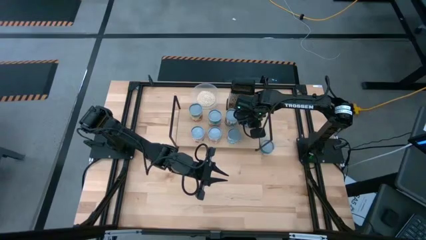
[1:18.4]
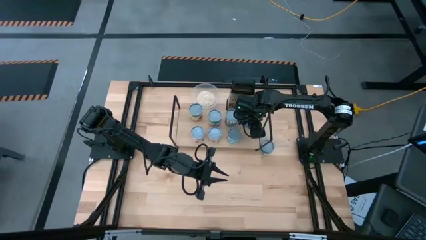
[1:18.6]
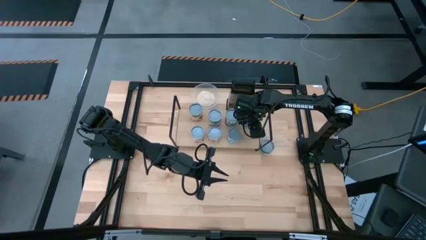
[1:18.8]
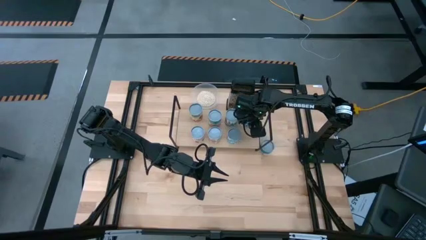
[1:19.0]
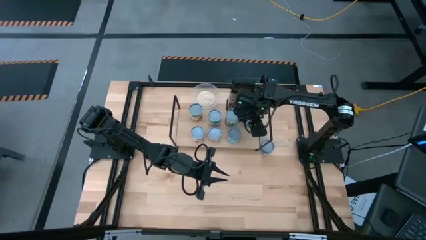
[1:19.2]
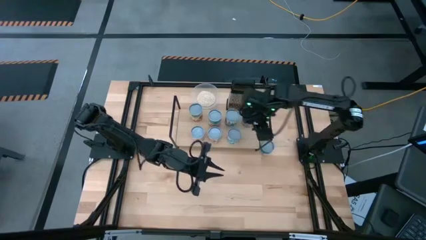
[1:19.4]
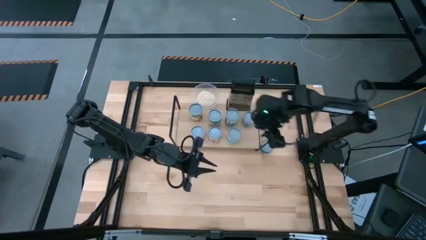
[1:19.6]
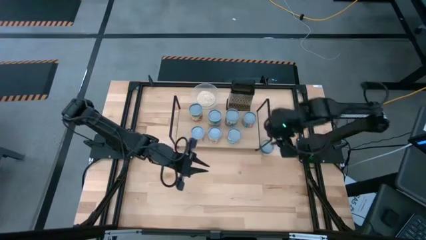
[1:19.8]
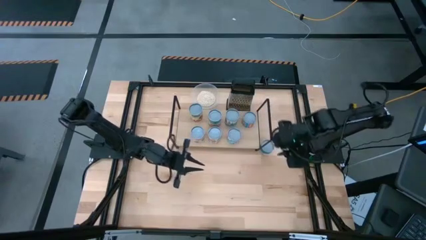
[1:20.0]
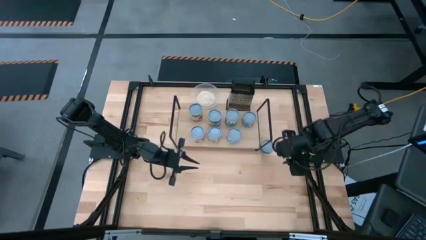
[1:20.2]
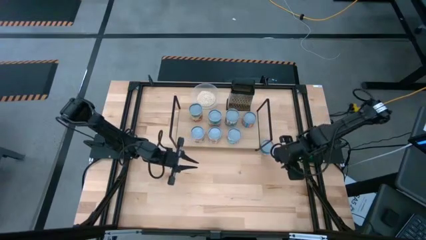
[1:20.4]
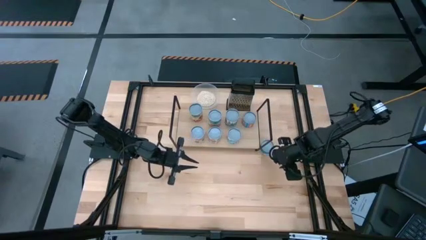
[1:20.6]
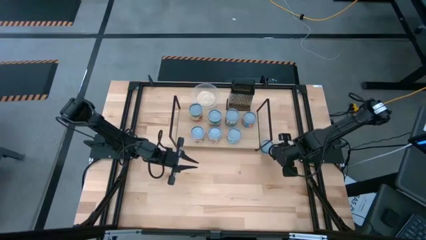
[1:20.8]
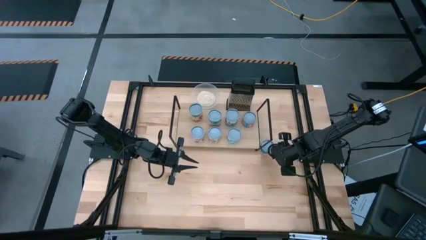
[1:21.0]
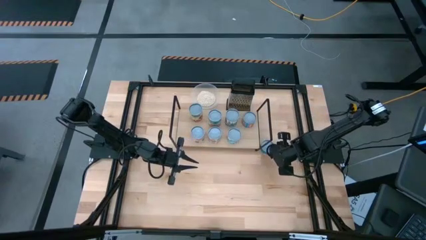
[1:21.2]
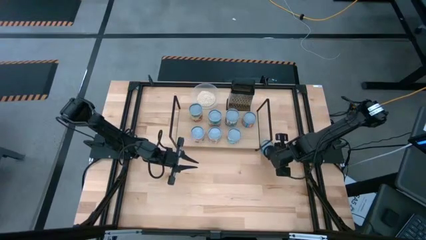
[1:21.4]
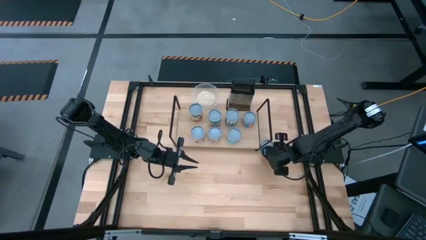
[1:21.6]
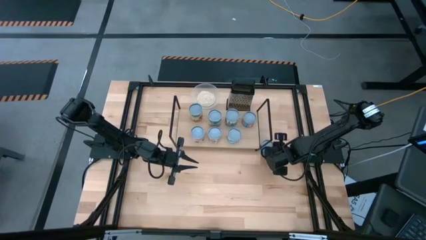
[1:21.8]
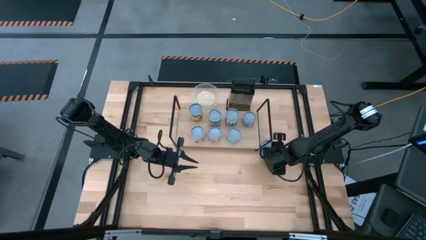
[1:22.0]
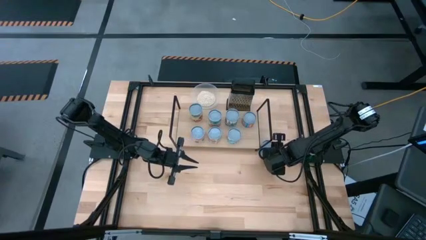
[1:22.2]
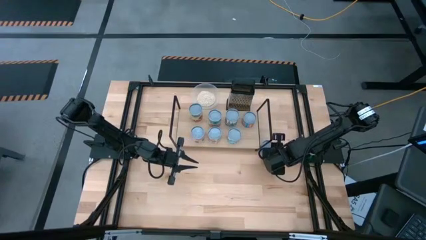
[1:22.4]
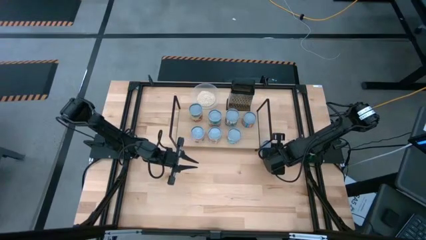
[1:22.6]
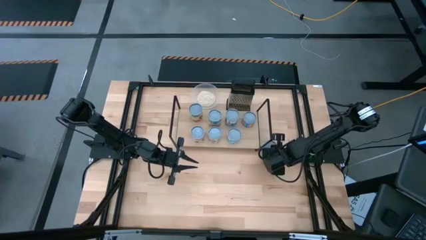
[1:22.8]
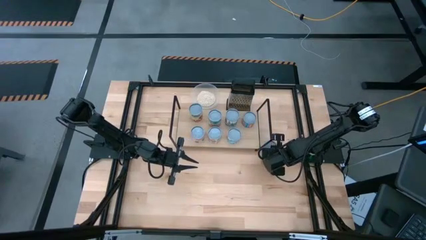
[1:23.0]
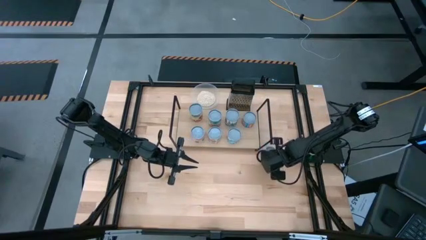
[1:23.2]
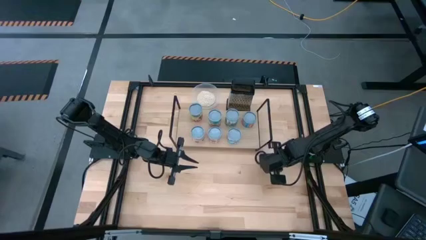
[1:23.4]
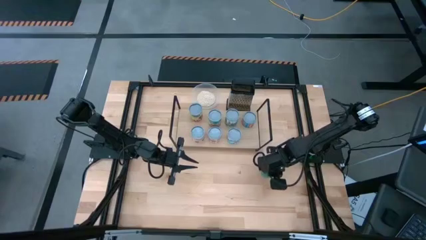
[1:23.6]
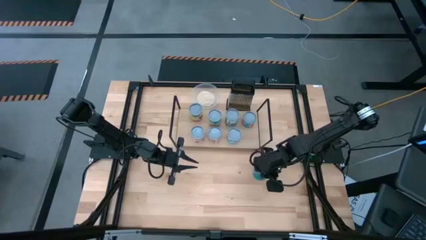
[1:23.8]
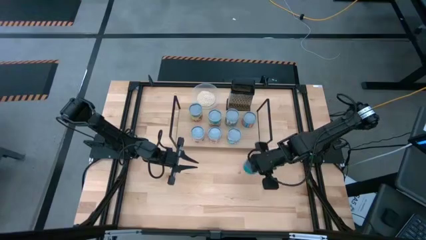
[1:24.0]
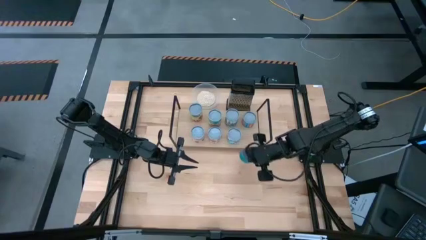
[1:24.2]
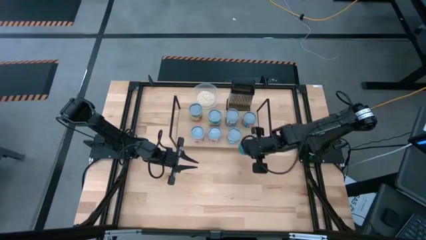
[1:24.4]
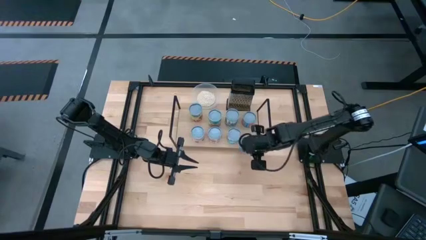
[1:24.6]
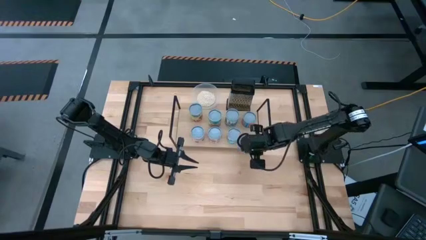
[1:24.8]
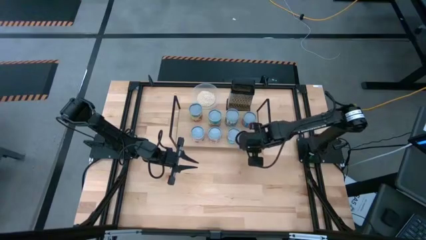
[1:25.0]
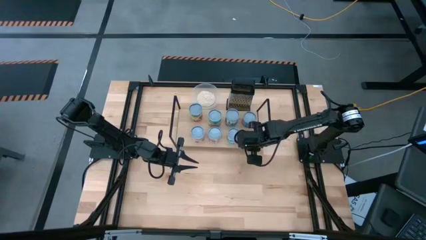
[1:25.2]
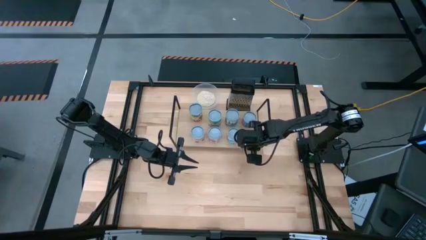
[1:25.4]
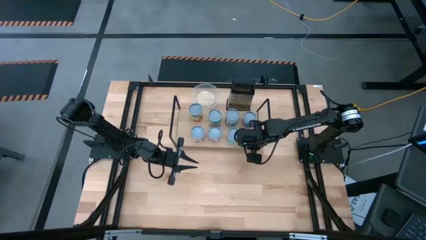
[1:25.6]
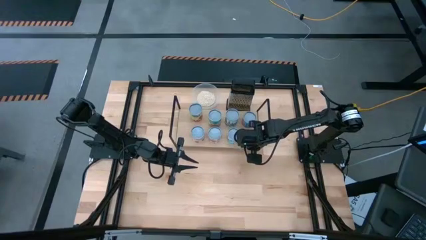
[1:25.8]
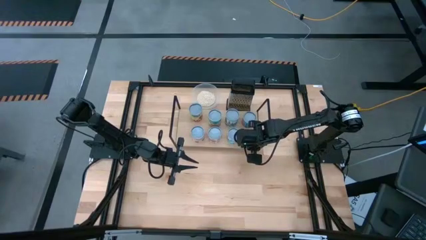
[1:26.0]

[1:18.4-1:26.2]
Task: Pick and place cans onto a shelf
Put the canned tuna on the shelf

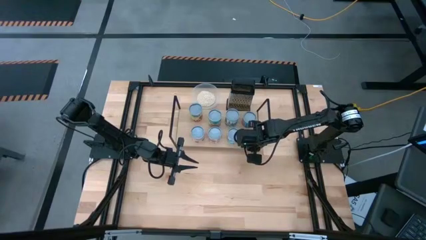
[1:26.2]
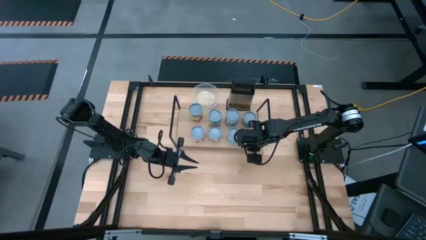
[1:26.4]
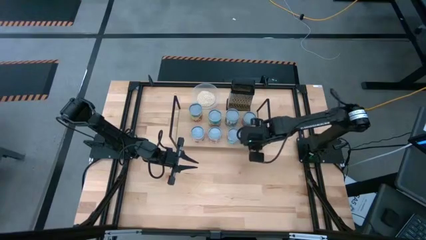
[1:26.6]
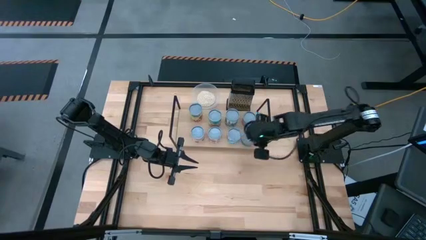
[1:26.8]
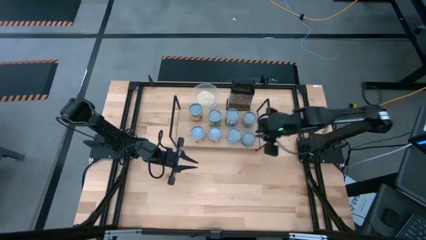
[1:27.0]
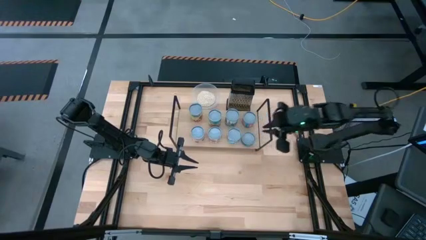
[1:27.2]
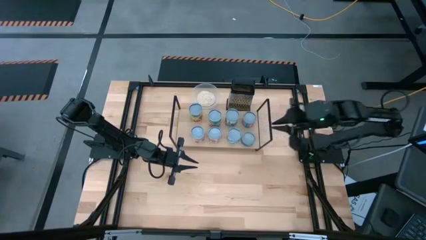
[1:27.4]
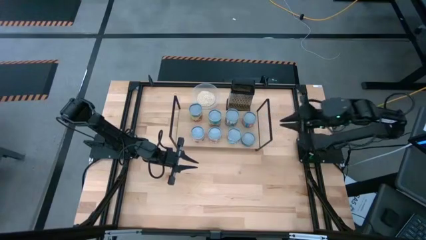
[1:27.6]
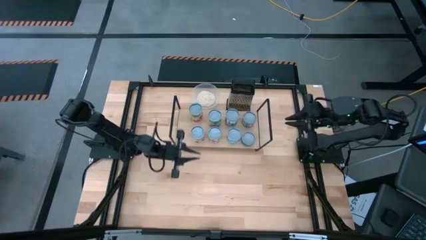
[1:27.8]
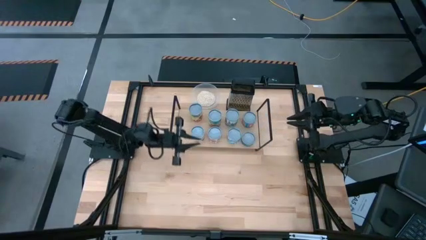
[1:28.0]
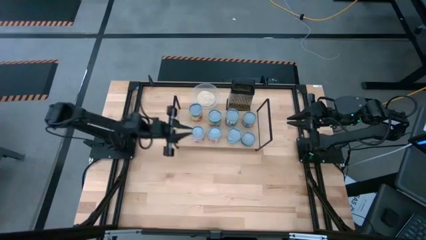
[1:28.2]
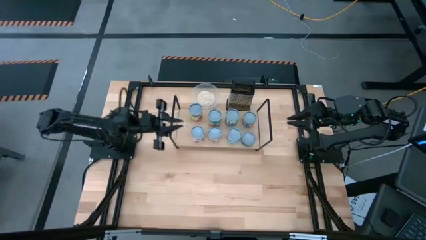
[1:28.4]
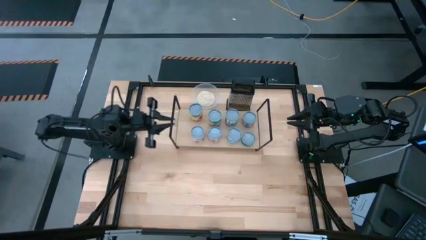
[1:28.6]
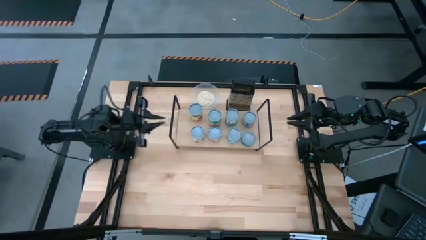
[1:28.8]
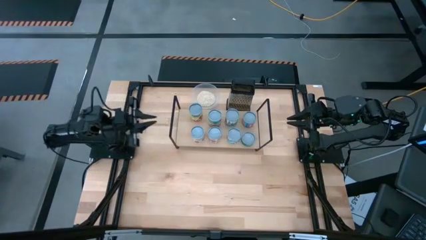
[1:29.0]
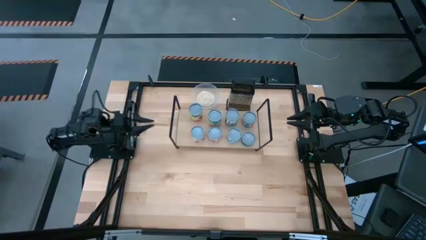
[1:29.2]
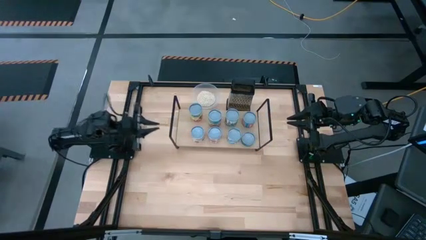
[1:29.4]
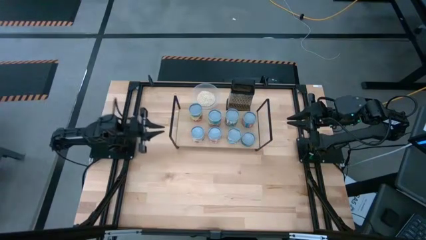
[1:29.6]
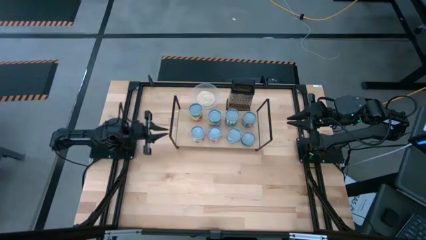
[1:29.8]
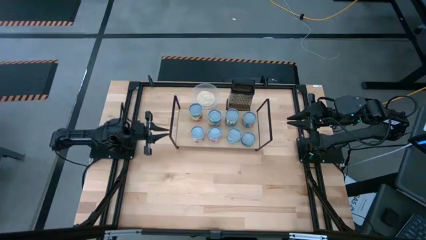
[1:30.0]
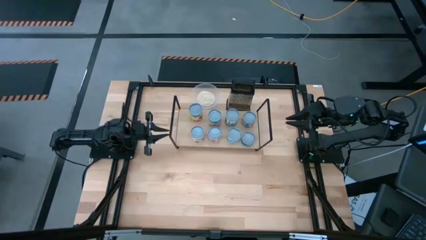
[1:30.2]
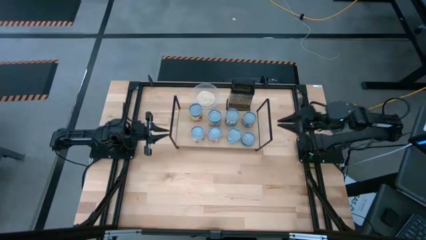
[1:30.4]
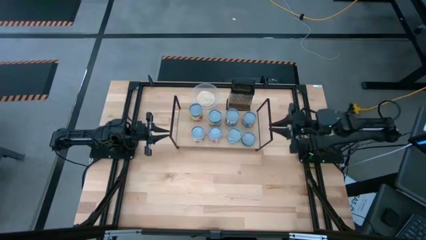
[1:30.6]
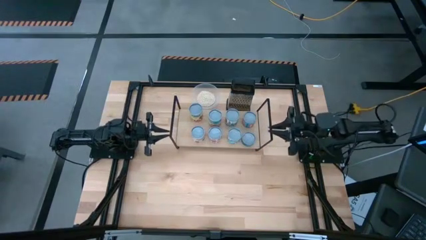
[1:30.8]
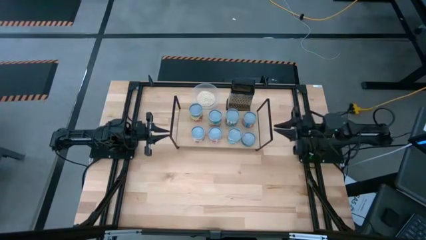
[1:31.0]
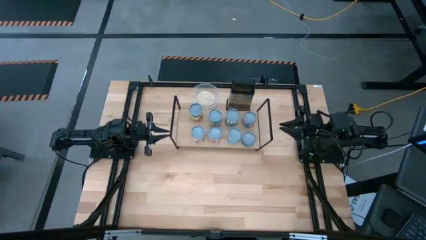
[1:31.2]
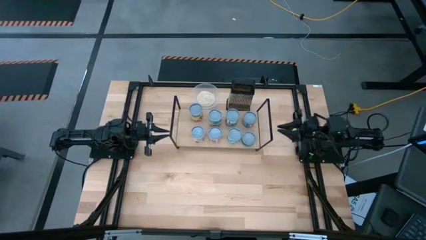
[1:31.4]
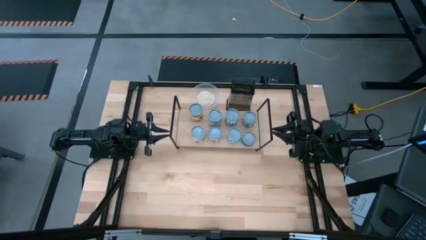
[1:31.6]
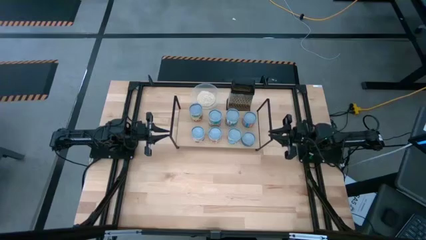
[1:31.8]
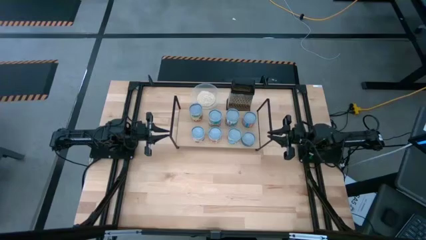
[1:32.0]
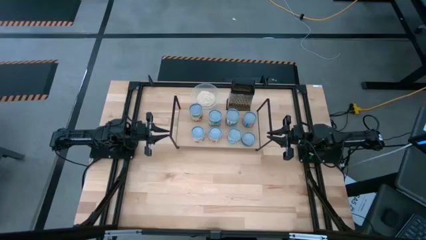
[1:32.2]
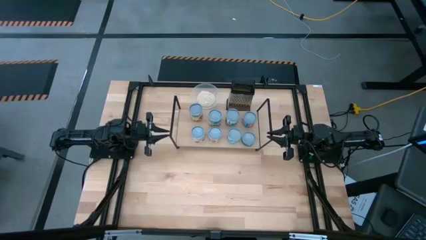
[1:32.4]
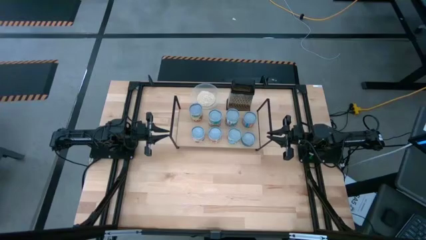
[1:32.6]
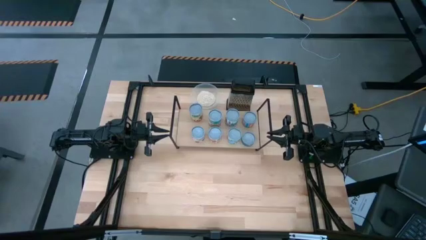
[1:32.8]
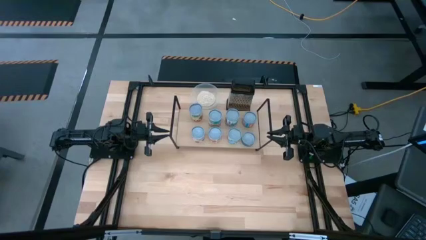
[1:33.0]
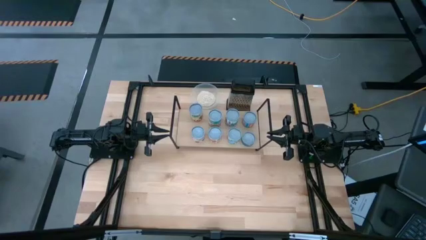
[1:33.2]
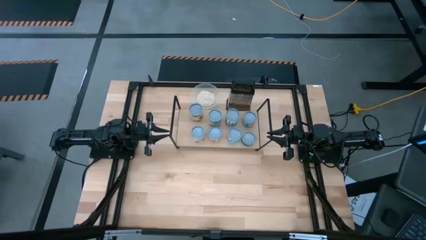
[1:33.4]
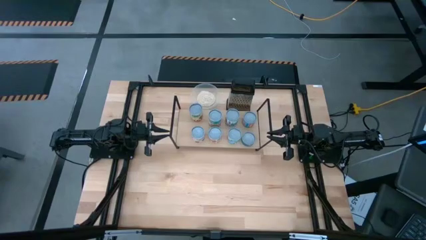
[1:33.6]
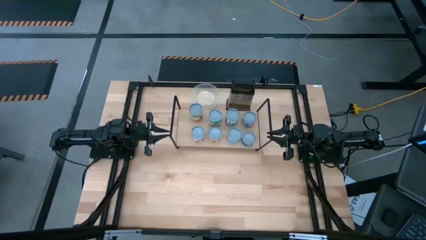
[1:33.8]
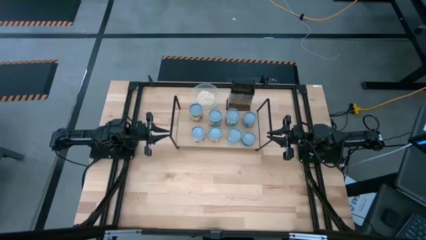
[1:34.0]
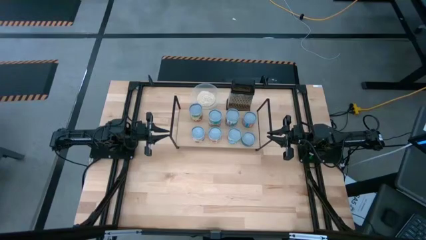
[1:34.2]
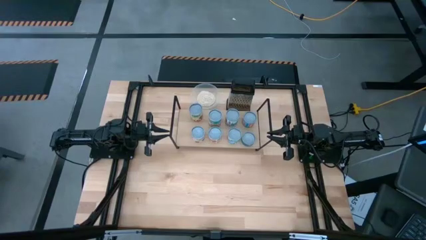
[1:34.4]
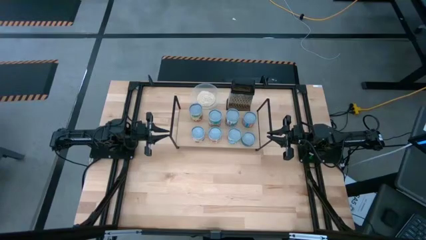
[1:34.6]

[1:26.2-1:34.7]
Return to Home Position
